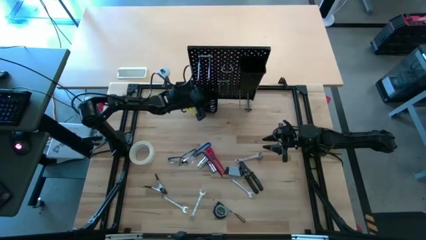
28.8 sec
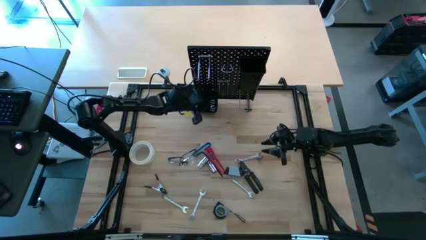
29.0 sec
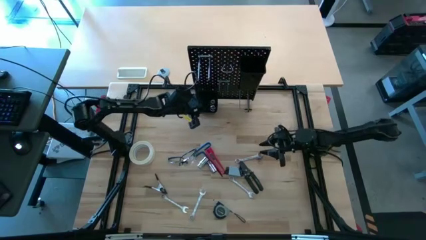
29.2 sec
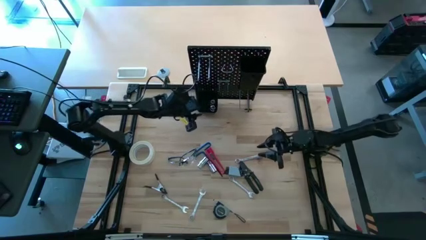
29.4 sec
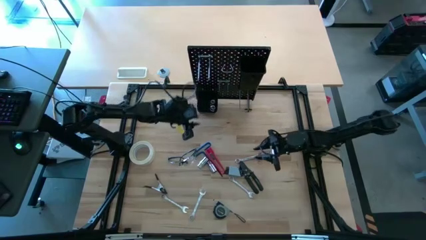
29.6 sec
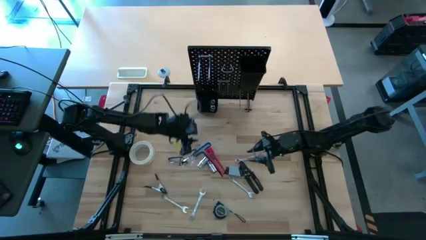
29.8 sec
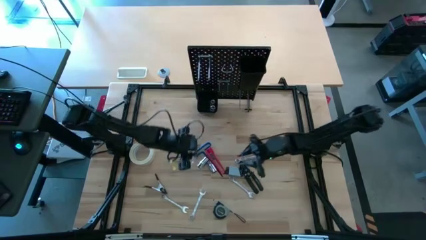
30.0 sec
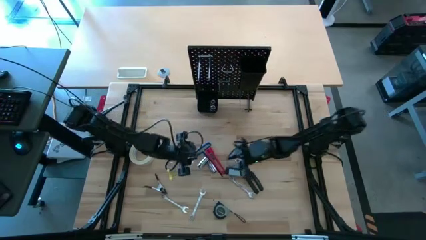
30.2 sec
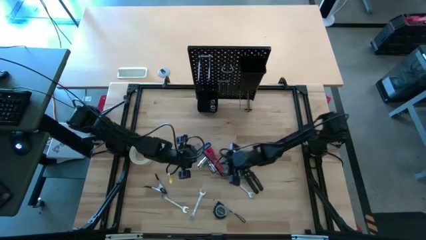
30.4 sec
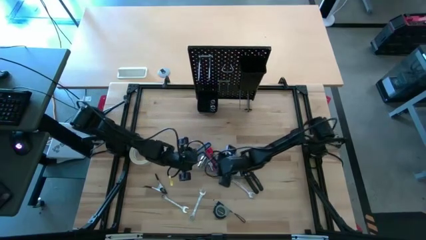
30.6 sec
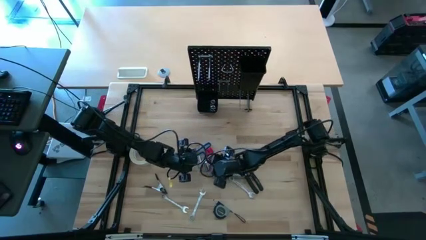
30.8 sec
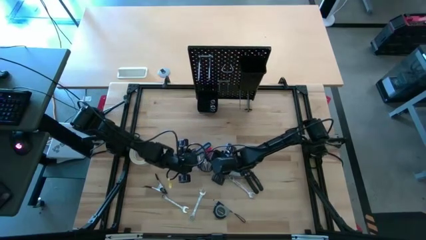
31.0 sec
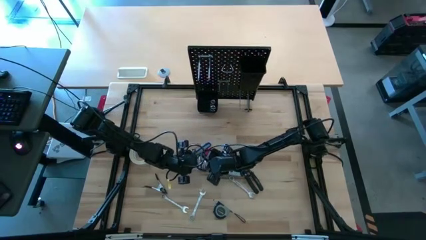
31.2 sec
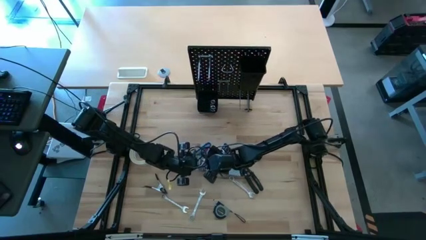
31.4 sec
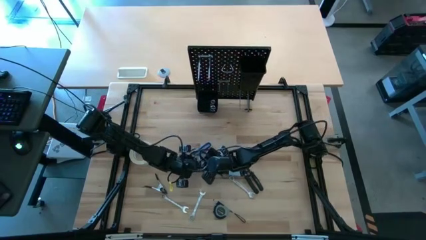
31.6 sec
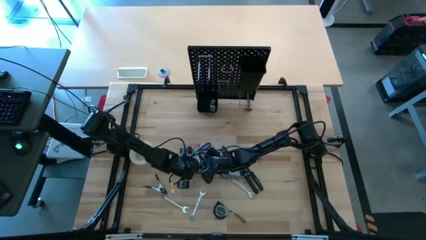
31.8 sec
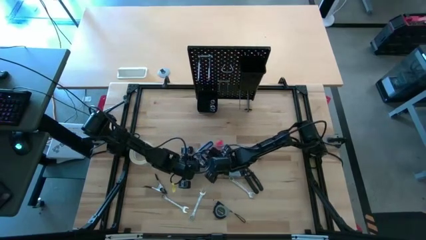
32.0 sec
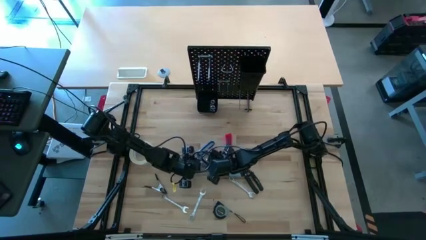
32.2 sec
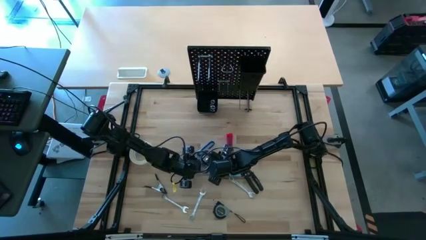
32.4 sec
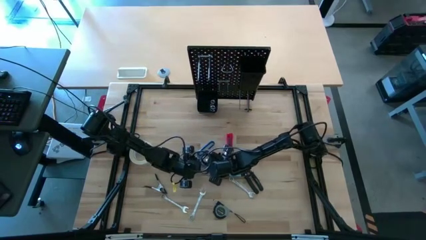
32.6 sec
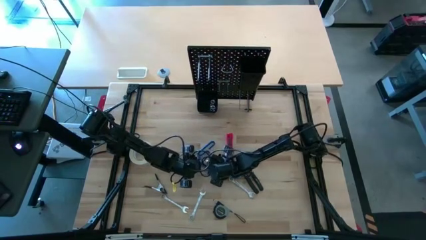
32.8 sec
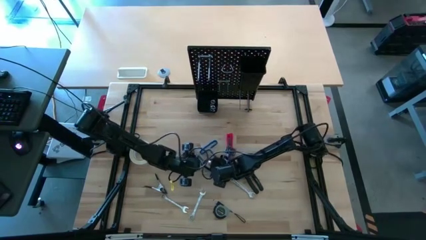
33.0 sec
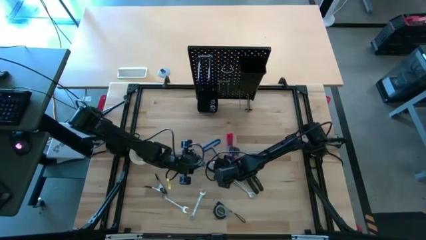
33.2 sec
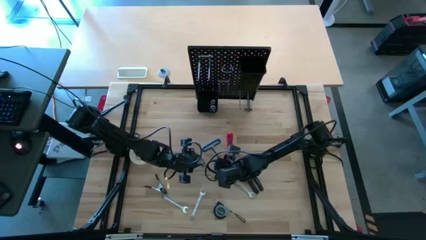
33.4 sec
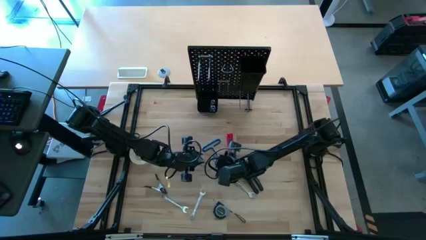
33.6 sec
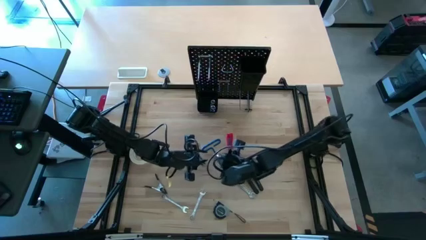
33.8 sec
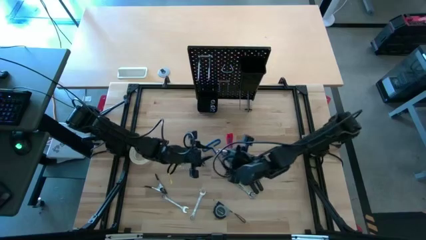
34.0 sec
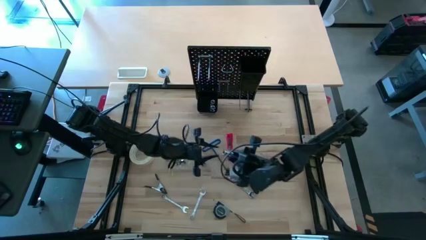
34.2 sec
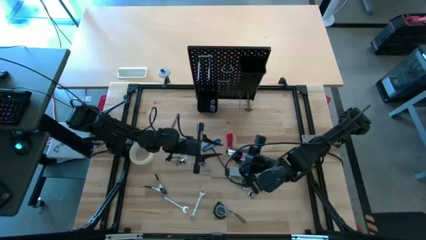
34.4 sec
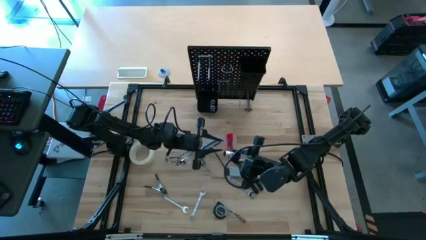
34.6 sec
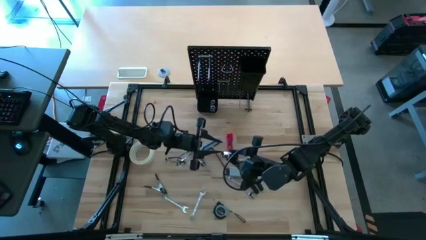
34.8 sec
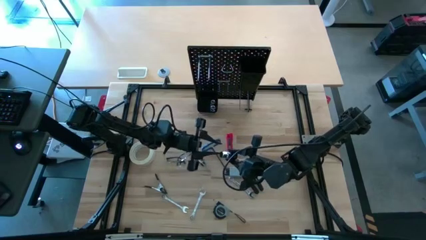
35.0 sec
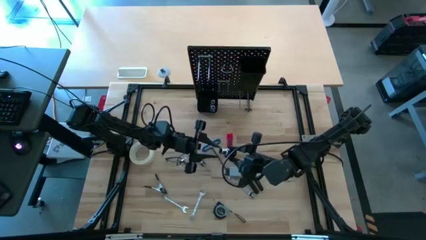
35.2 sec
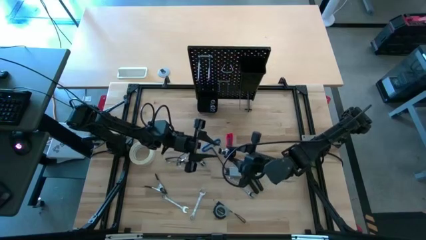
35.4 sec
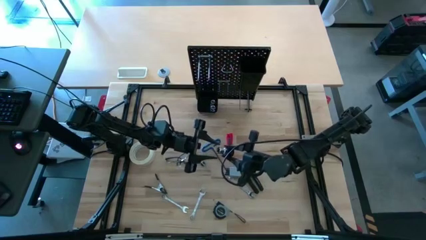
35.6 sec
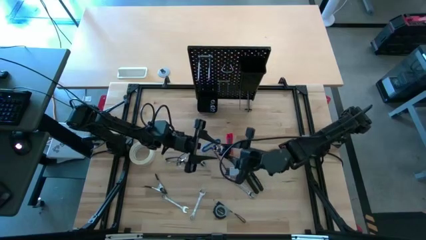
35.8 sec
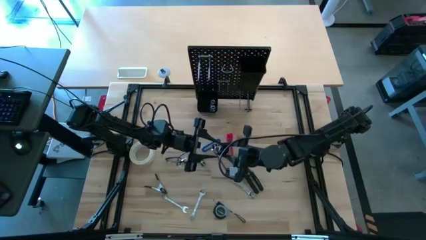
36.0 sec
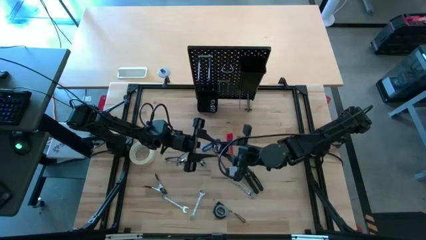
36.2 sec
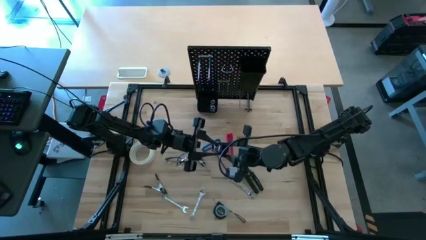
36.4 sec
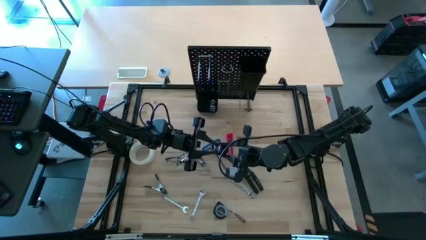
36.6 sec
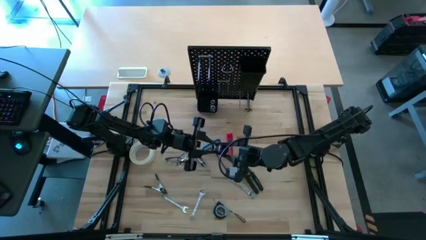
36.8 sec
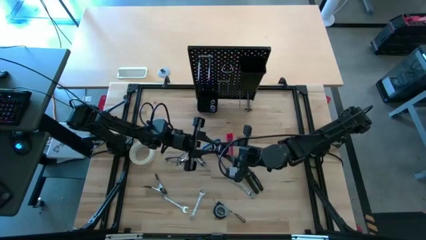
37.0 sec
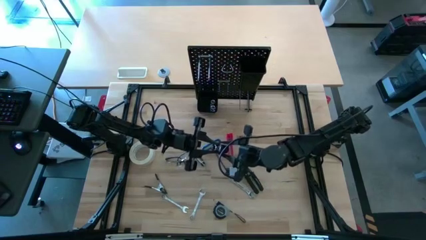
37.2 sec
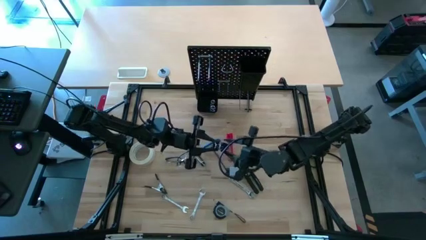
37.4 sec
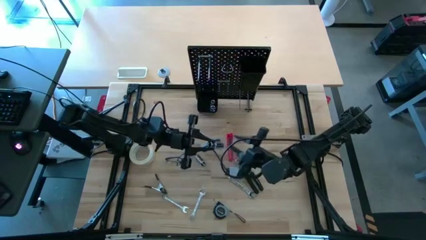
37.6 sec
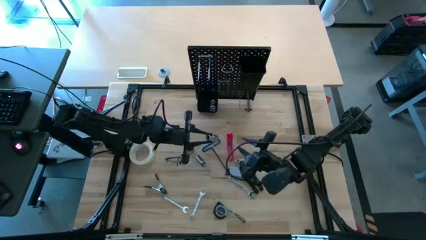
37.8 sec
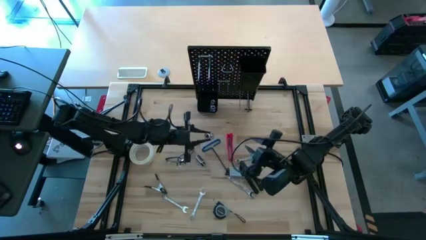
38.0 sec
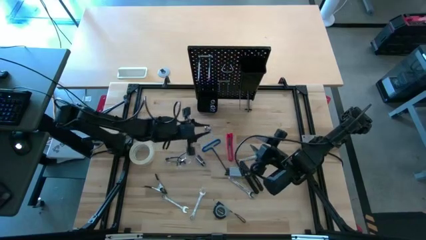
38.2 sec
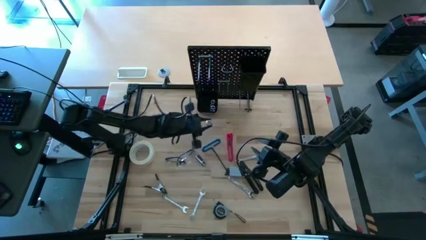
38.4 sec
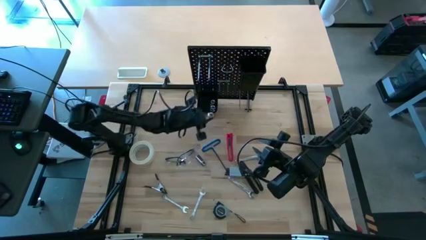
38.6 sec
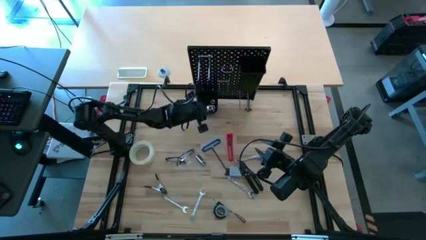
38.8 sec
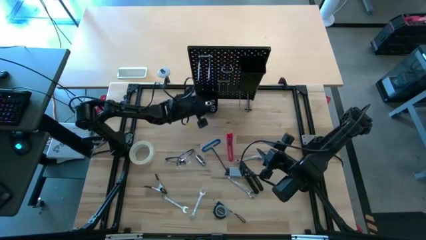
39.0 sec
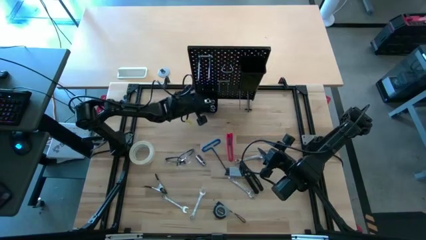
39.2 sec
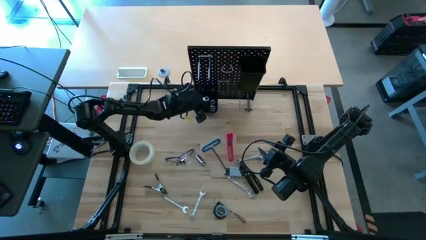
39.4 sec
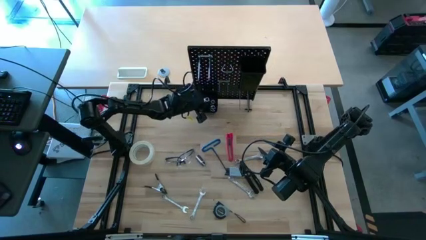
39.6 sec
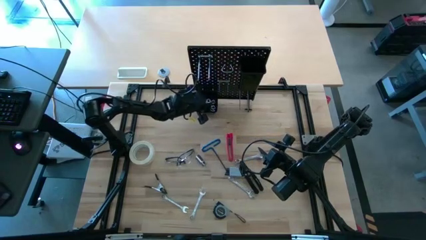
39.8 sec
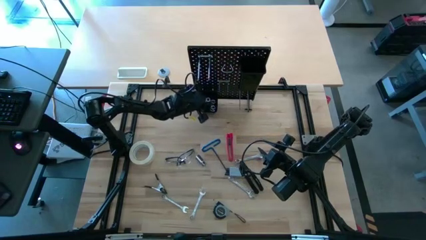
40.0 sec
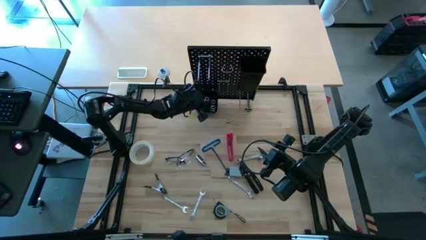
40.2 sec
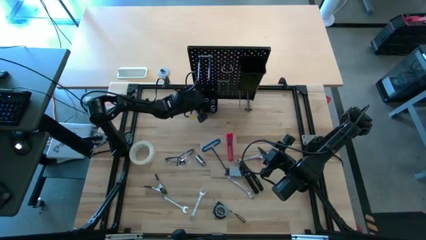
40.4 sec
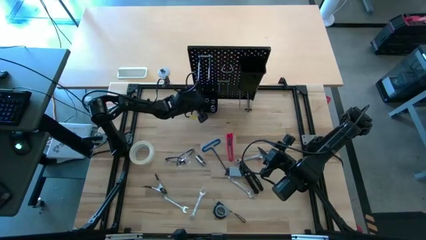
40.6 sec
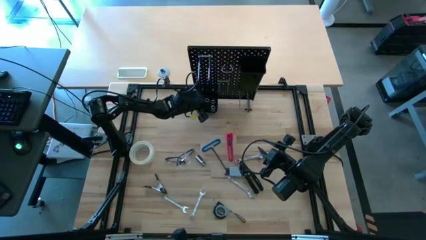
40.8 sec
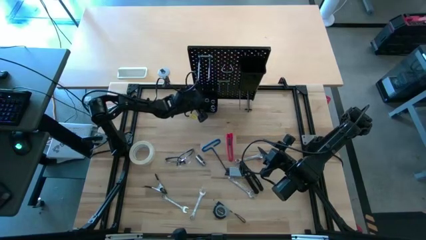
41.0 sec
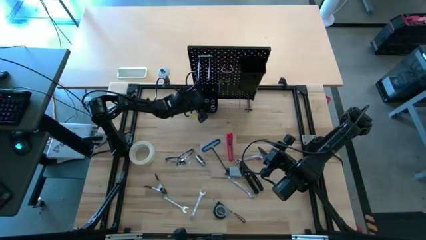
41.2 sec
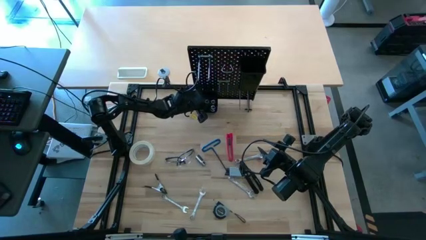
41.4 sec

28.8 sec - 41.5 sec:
Task: Hang tools onto peg board
Put the right socket into the bottom bin on the peg board

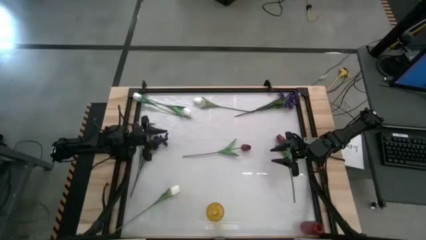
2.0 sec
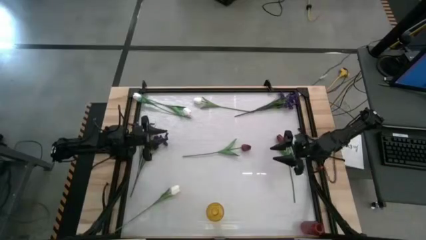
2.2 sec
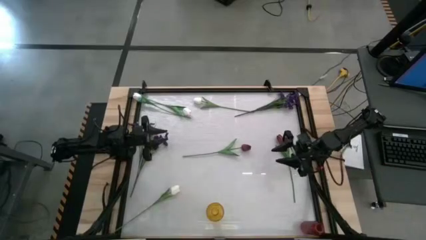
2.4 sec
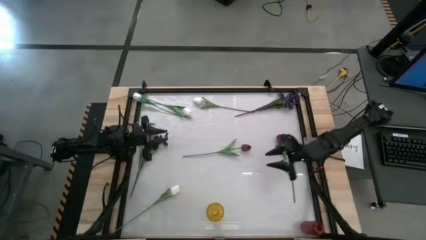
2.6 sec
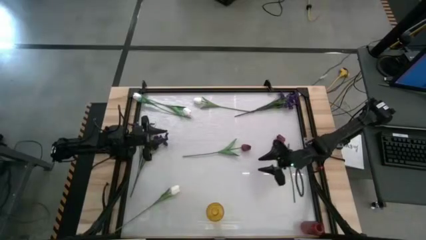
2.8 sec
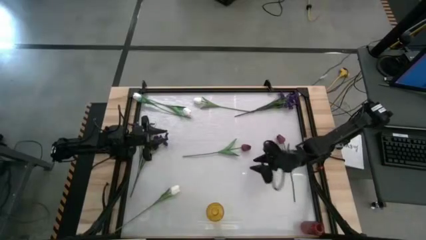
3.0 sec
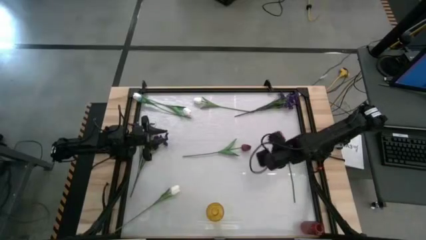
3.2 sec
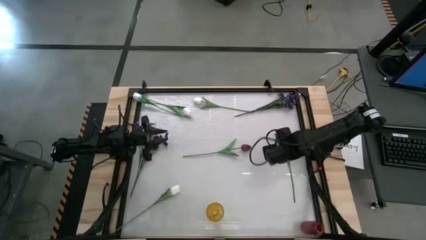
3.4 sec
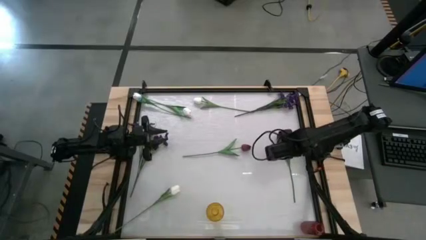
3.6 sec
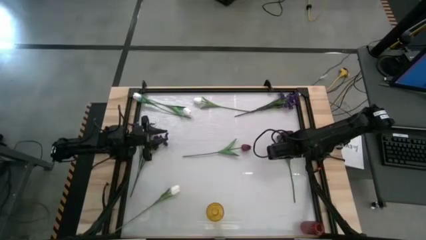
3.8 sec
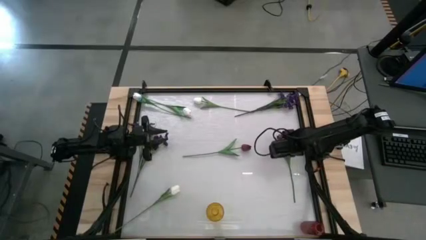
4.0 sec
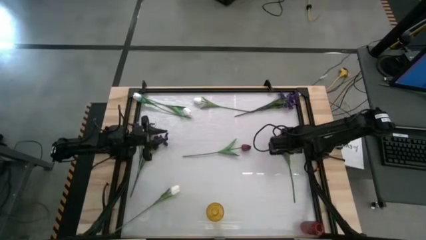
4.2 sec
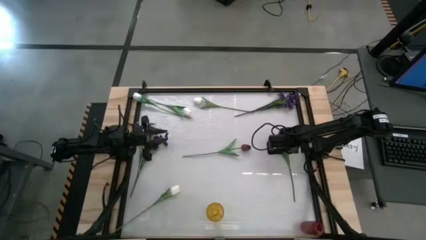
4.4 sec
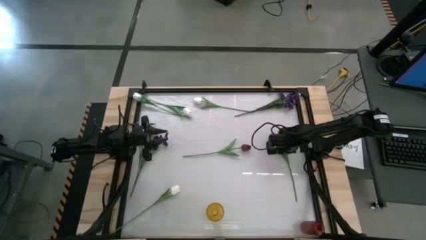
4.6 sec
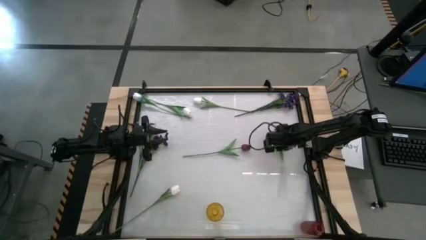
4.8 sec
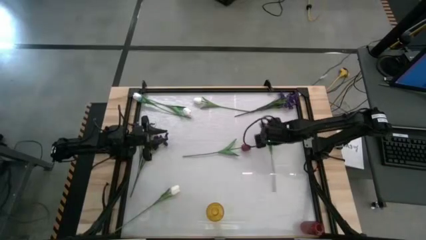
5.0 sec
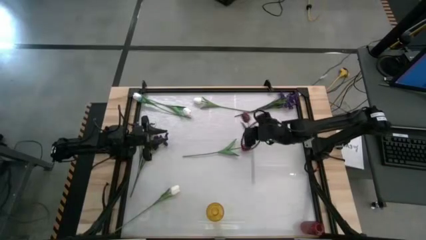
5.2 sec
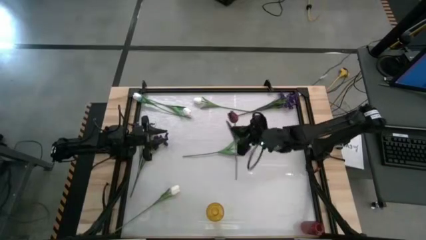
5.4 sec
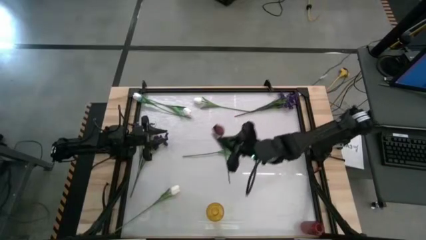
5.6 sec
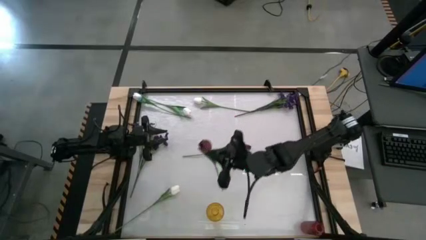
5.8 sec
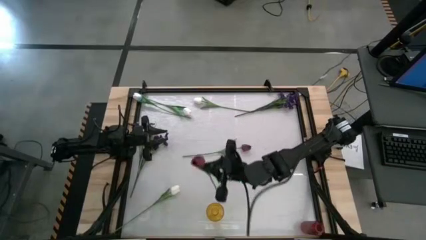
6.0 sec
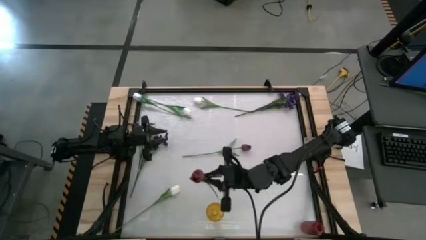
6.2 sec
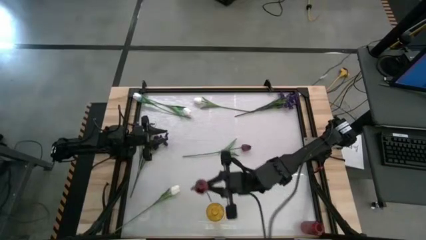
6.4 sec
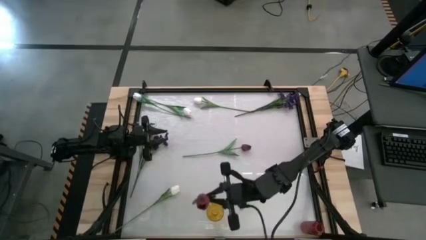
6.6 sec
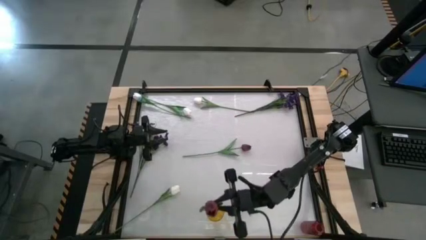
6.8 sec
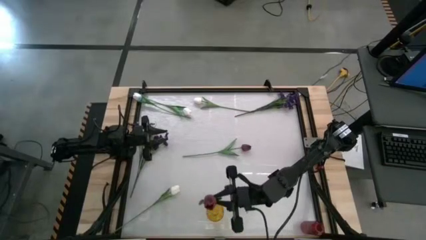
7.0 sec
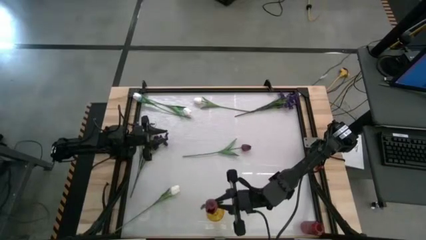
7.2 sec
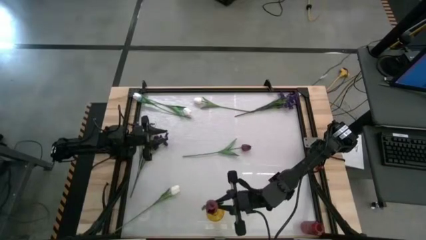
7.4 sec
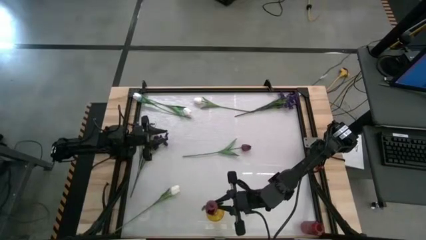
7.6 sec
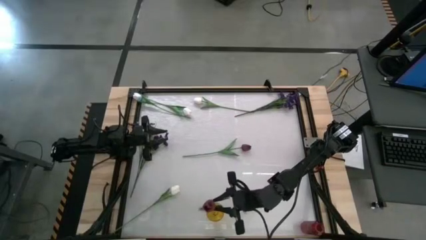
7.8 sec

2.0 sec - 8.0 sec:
Task: Sort flowers into vase by color
Put the right red flower into the yellow vase
